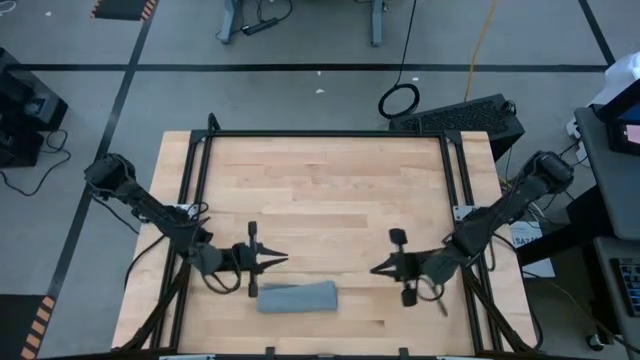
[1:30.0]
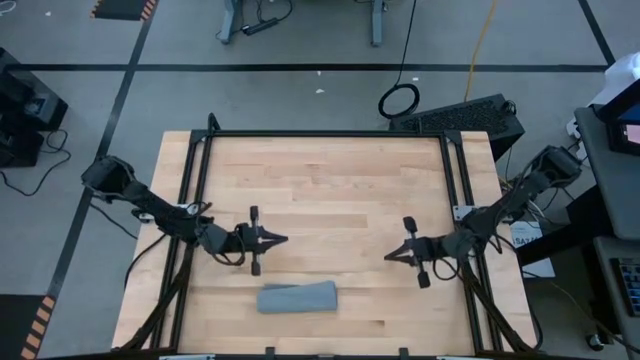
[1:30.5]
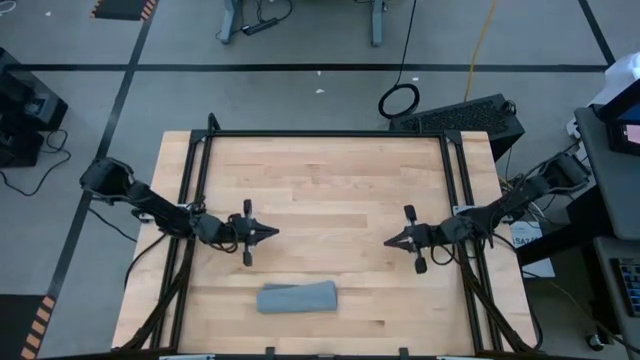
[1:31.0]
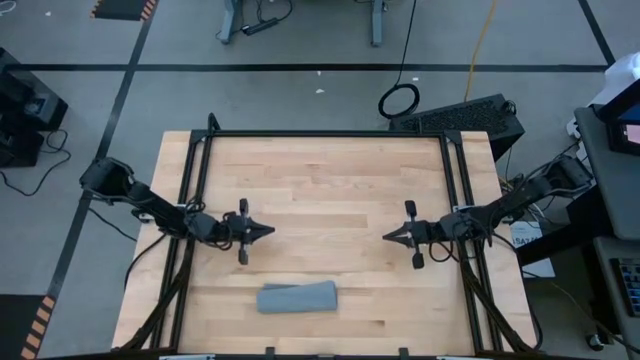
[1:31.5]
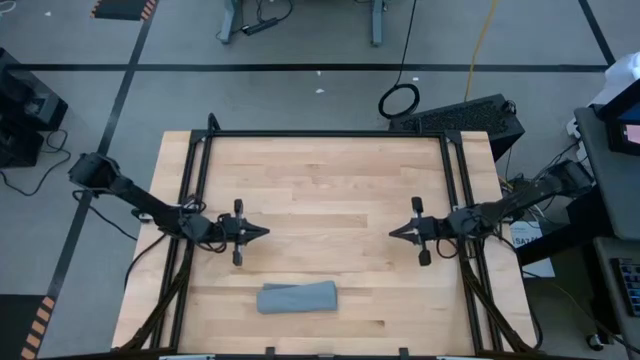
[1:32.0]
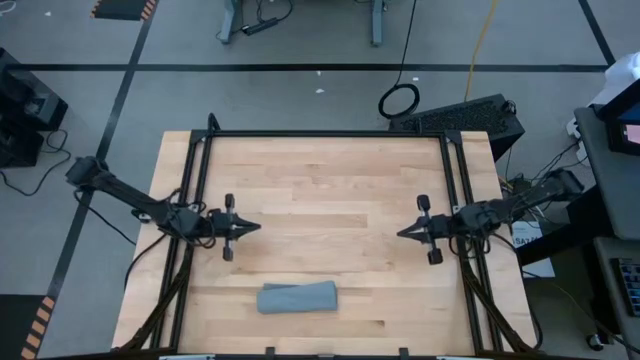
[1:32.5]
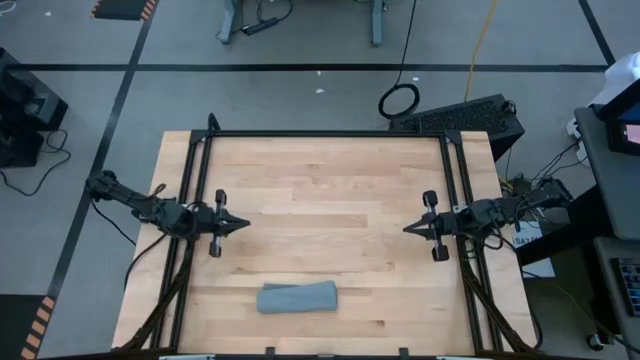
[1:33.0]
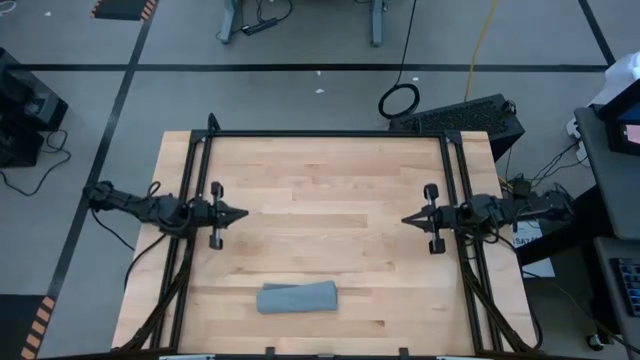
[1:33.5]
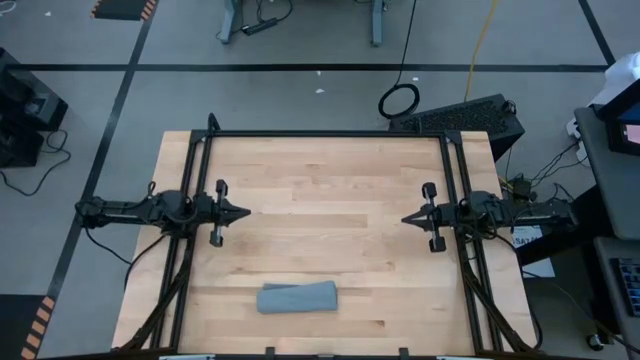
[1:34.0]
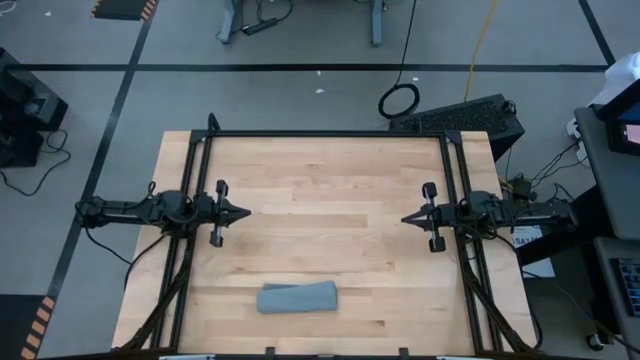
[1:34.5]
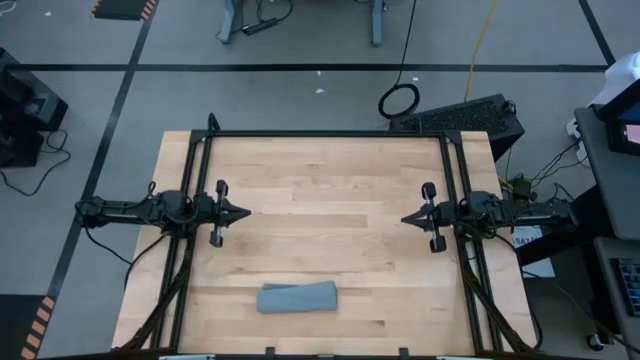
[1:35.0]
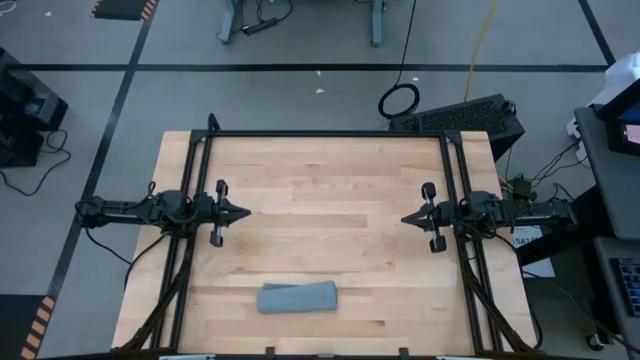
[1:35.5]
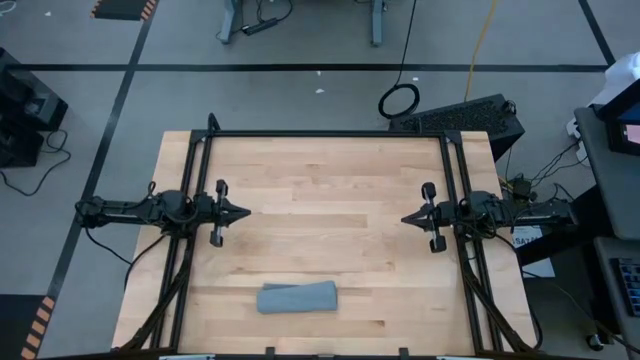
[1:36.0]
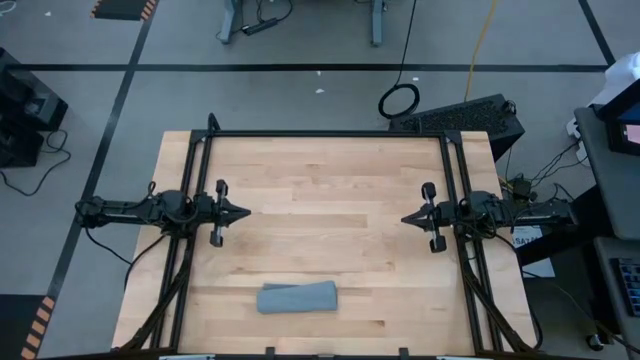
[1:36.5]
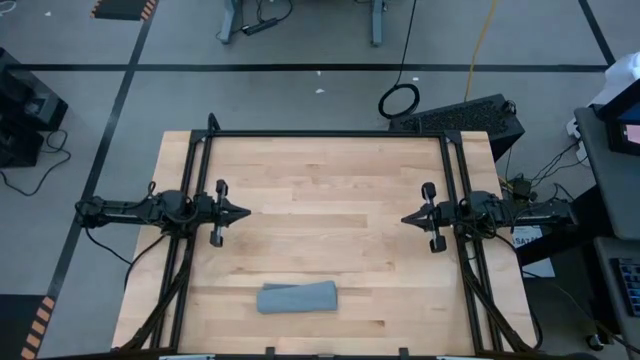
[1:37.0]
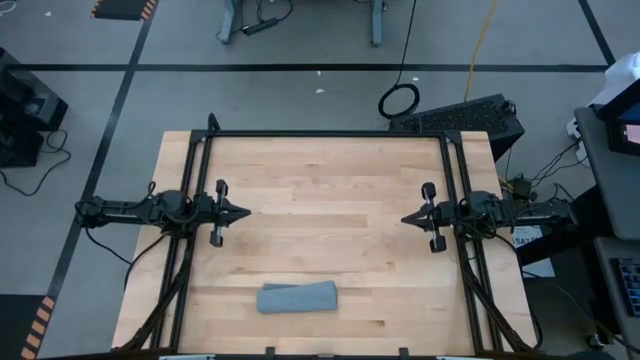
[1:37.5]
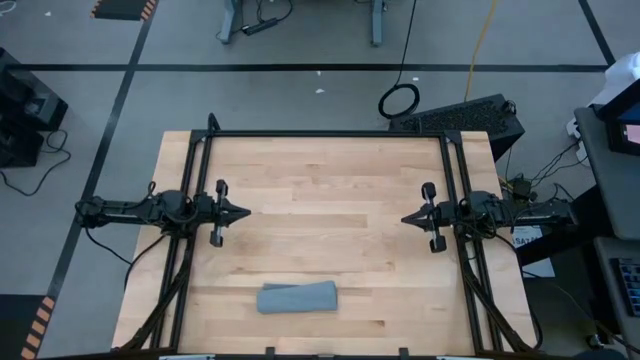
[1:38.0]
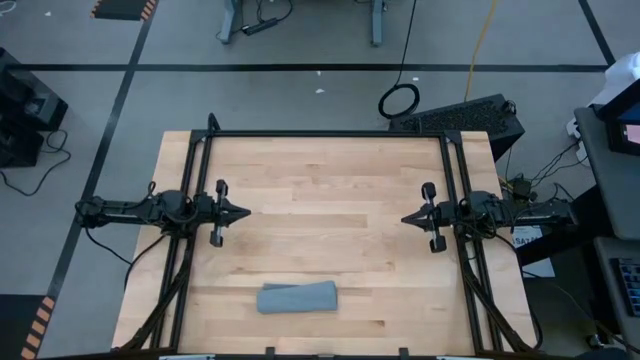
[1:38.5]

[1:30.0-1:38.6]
Task: Roll towel
Return to Home Position

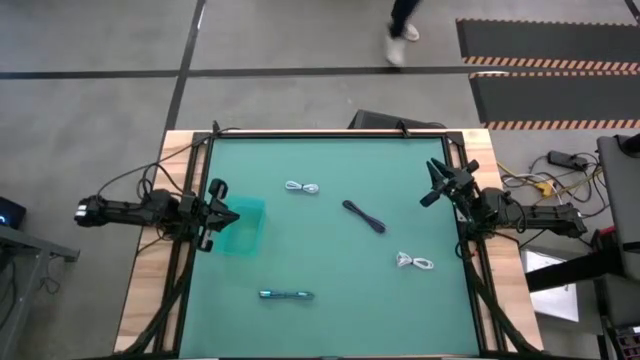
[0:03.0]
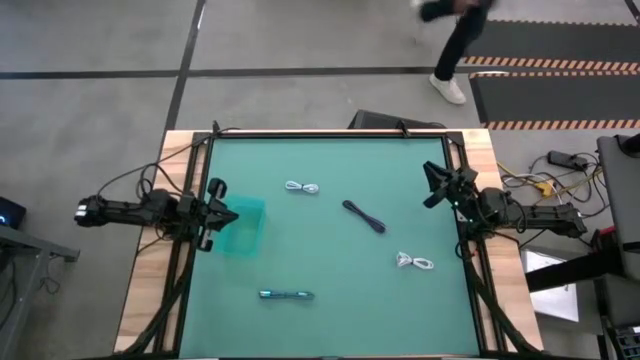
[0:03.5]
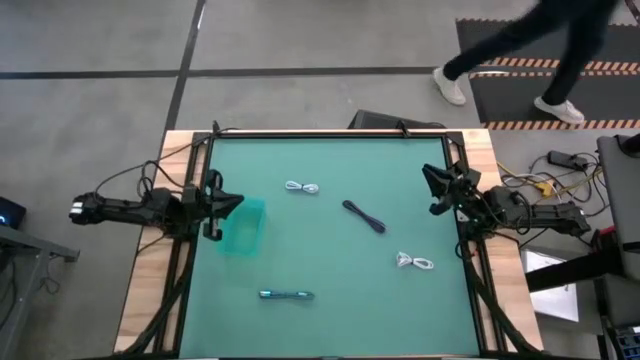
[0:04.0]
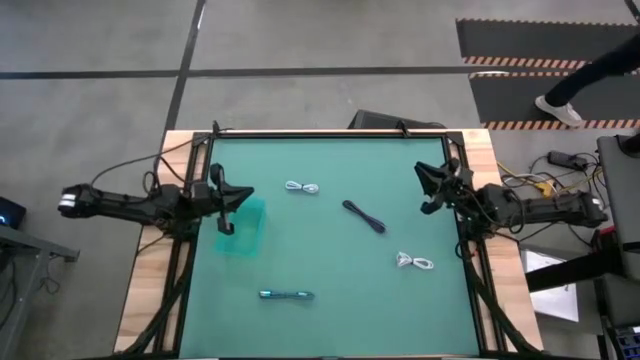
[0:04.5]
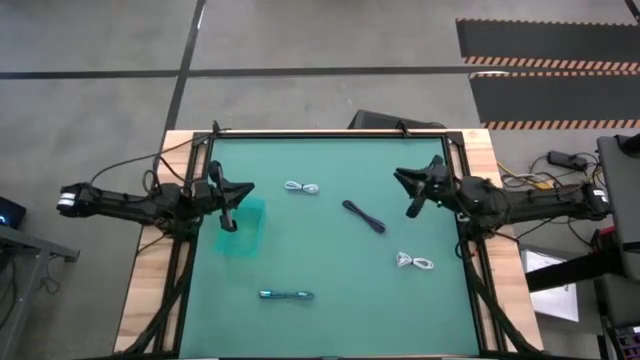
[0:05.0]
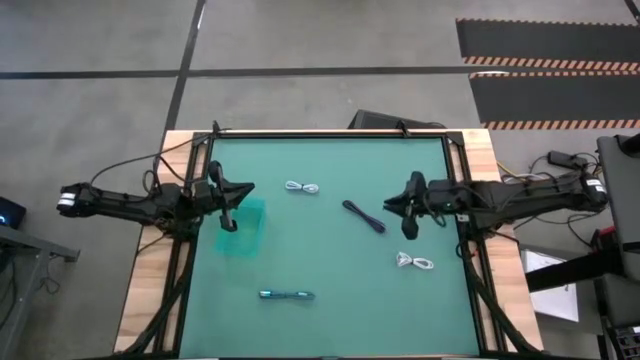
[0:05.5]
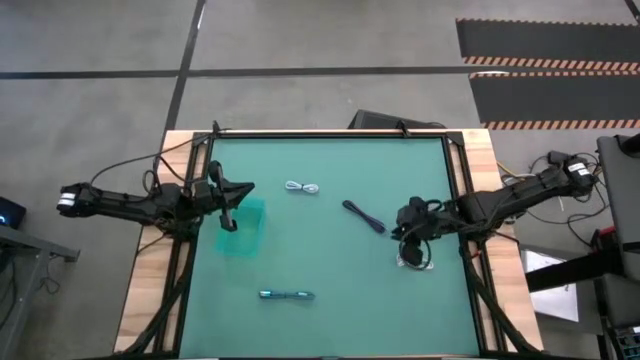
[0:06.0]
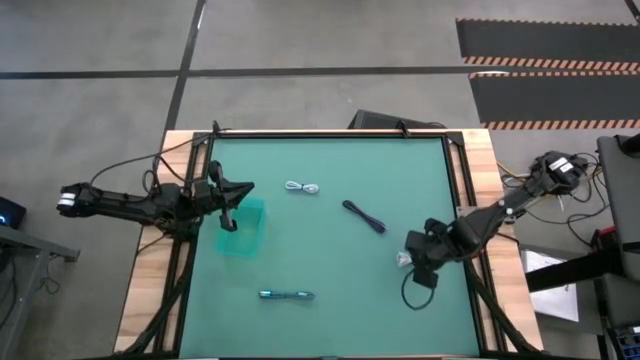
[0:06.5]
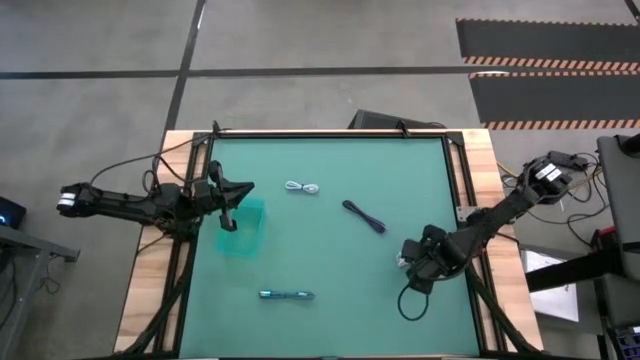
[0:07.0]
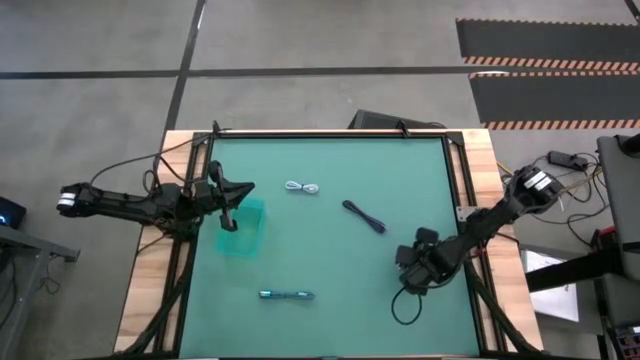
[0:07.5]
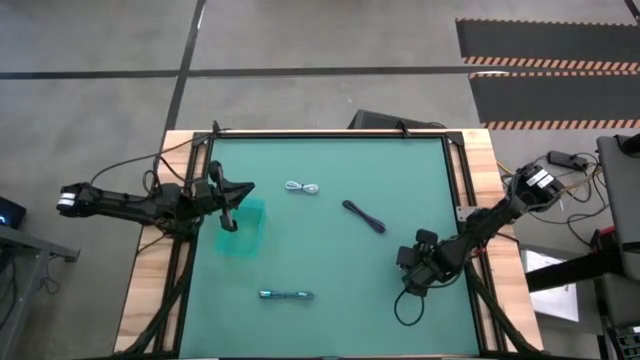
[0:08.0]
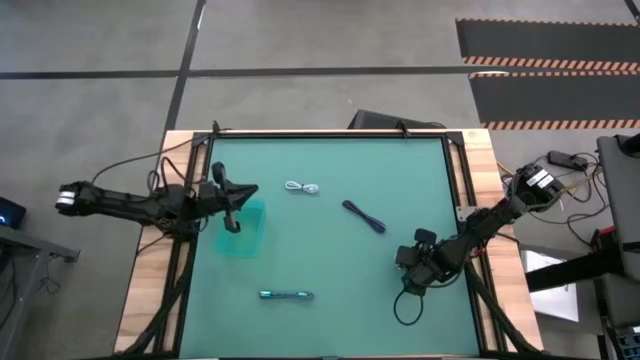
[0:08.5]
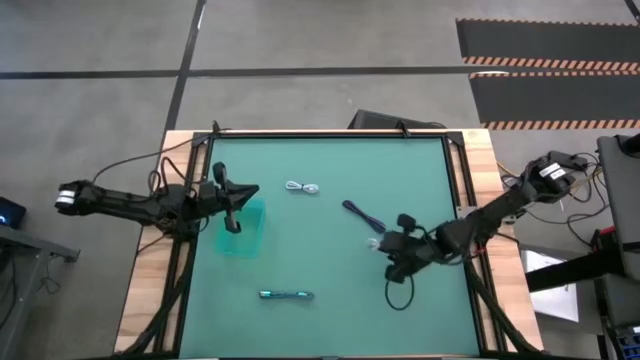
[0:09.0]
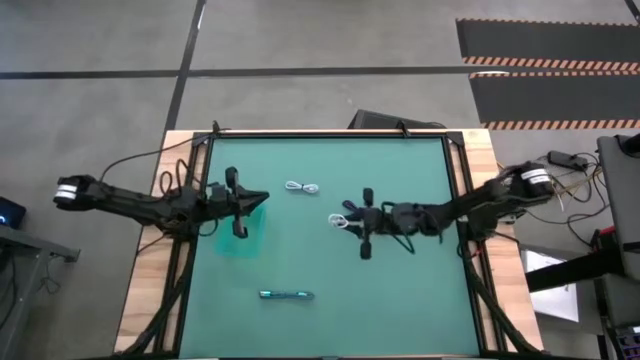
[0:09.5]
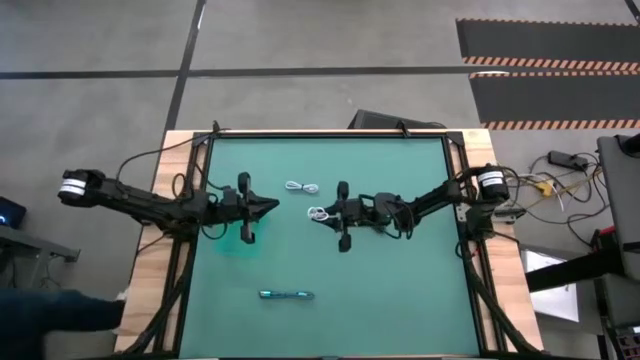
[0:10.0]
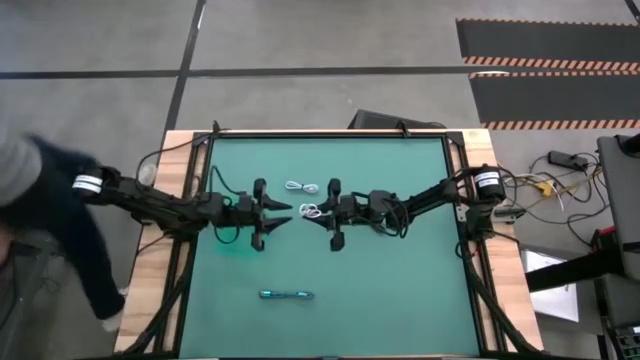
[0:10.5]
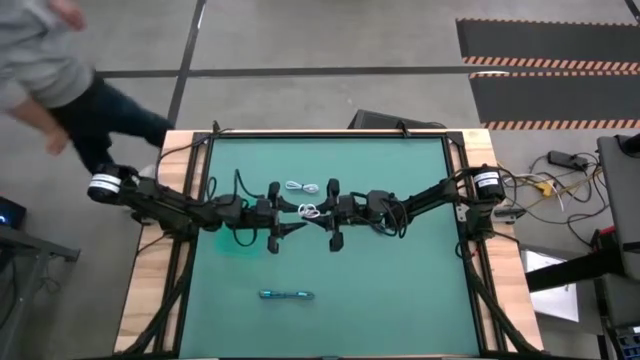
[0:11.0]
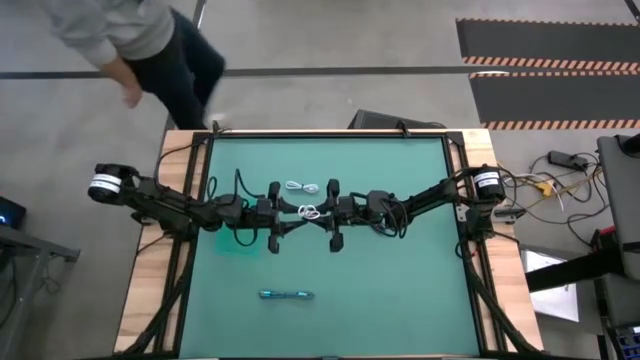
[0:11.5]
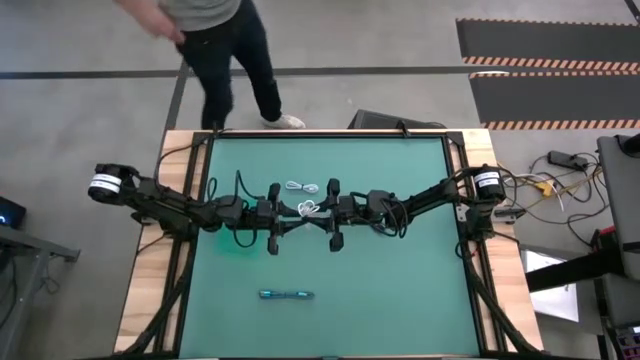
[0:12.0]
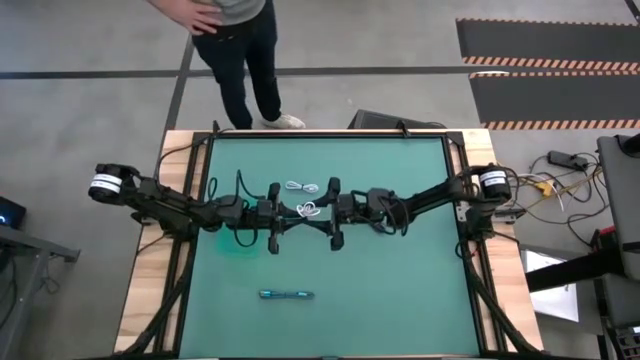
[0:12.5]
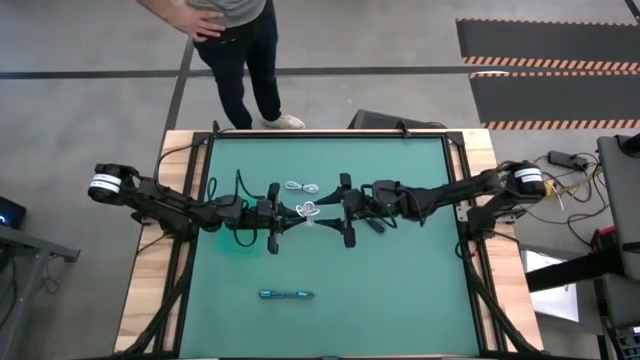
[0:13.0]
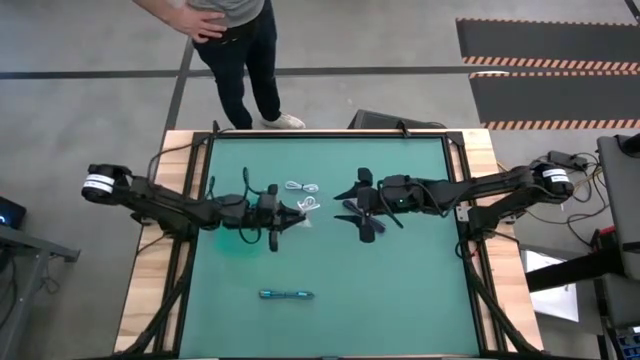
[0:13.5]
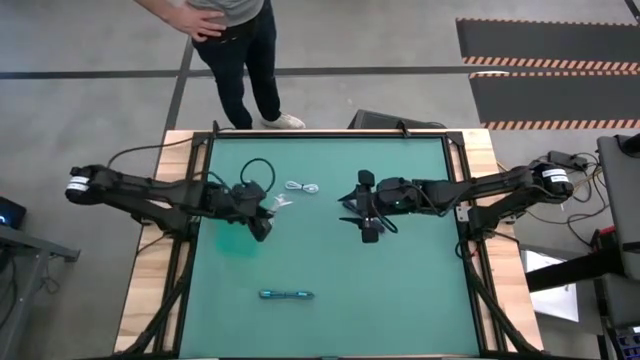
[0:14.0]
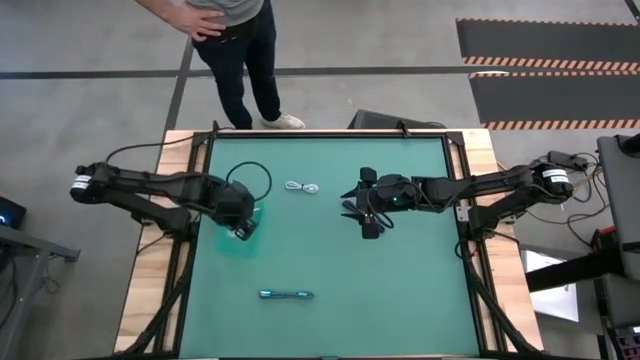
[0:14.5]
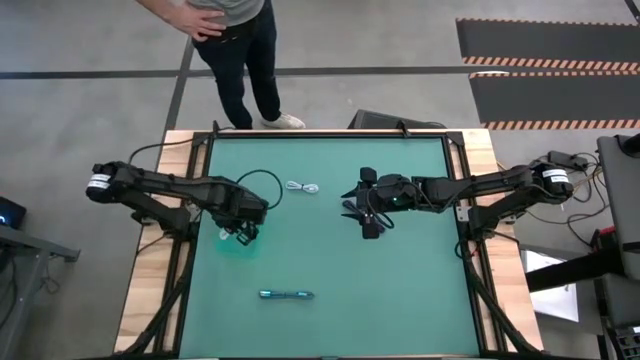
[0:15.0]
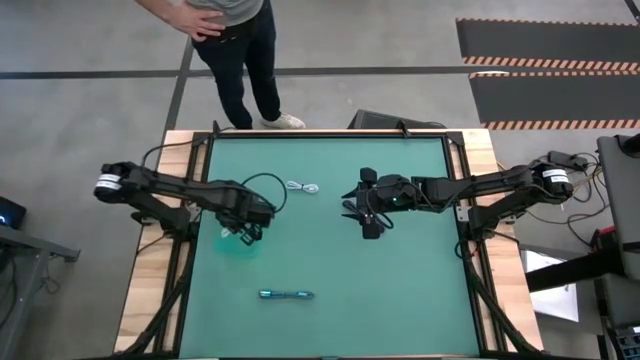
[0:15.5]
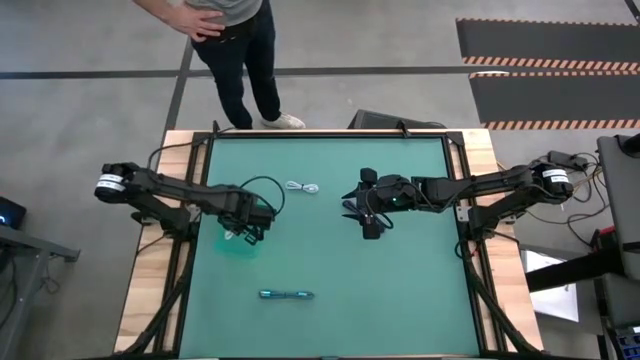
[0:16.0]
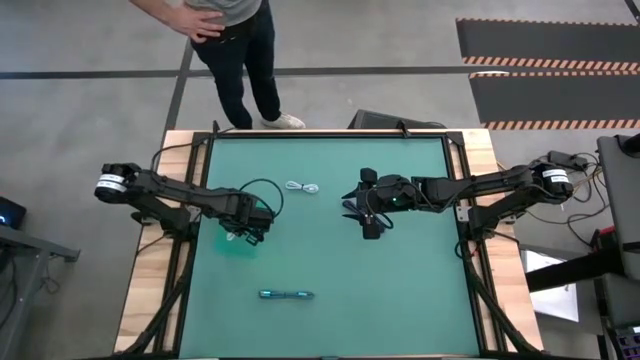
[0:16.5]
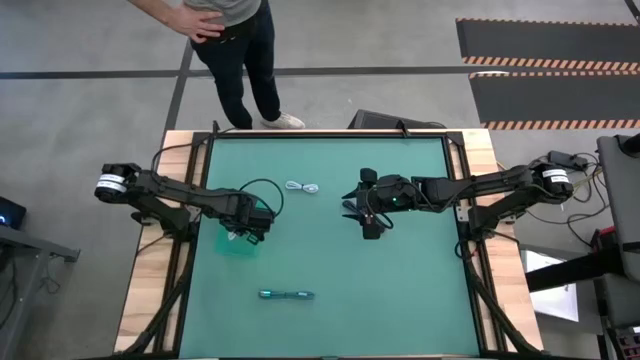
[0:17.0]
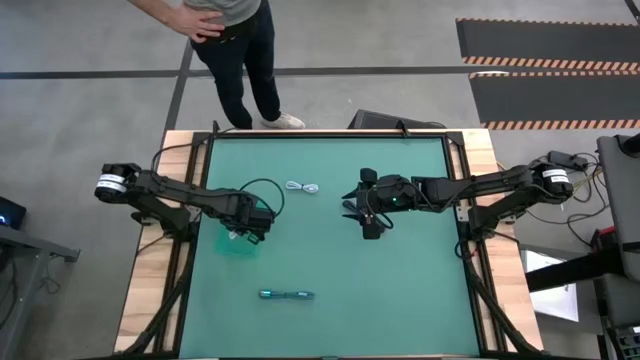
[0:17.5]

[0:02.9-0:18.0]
Task: Pick and place USB-C Cables
Put the white charger cable into the green bin
